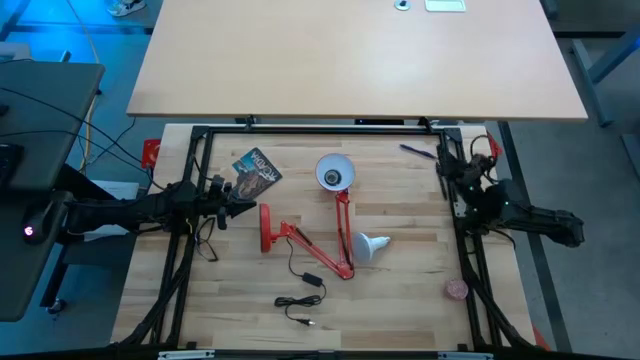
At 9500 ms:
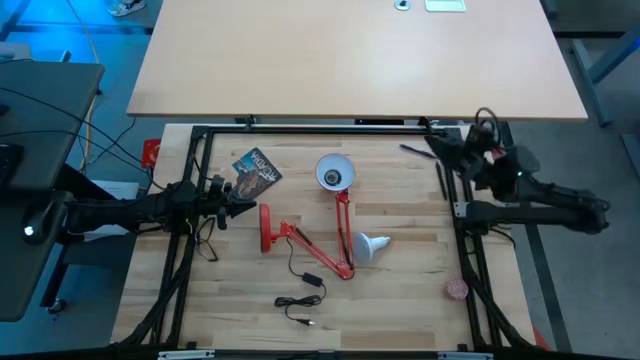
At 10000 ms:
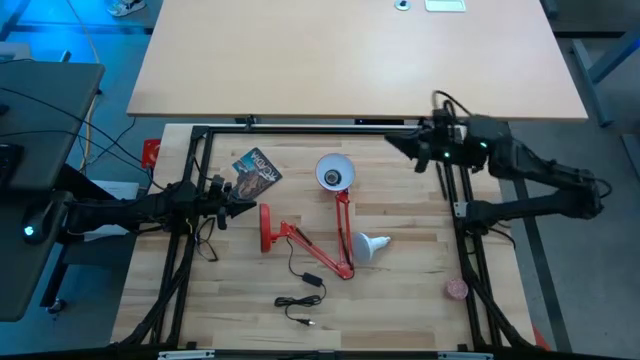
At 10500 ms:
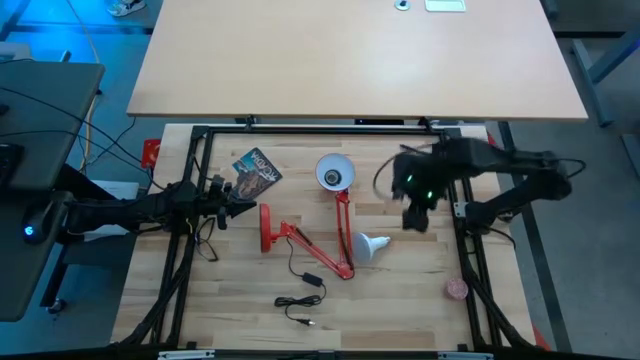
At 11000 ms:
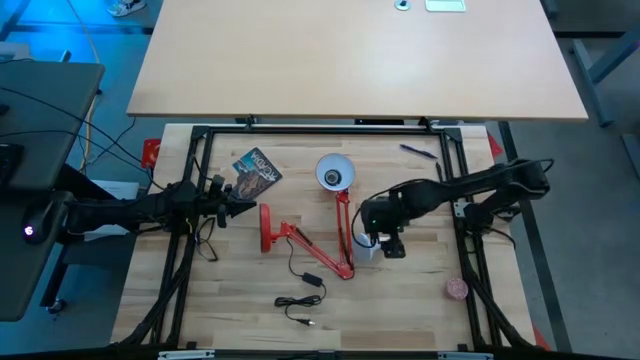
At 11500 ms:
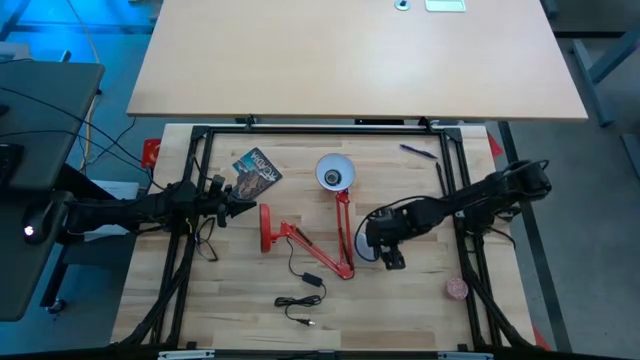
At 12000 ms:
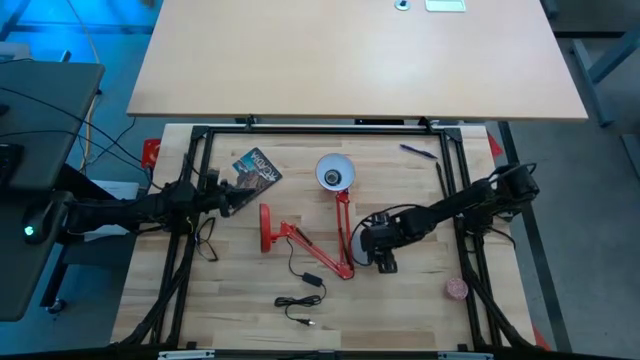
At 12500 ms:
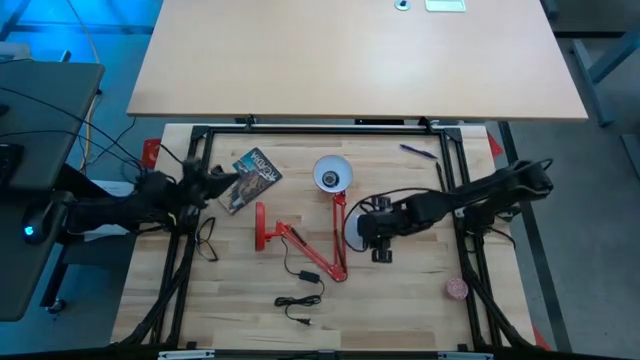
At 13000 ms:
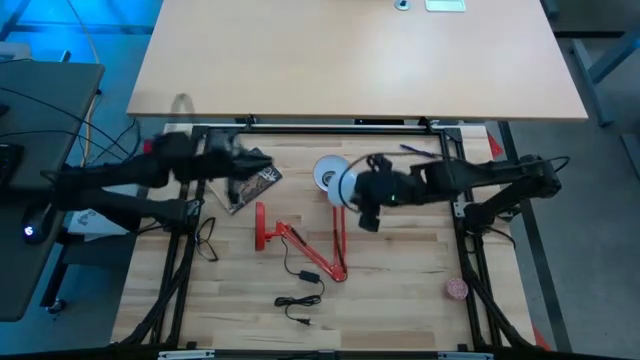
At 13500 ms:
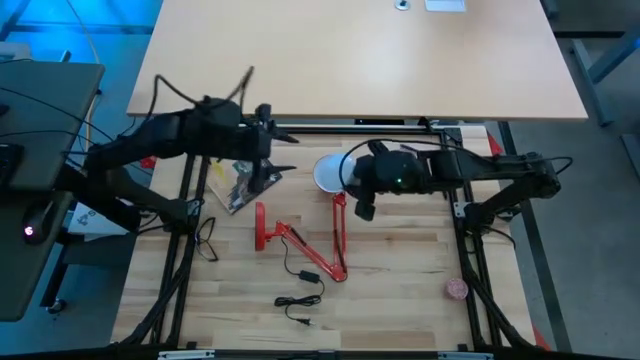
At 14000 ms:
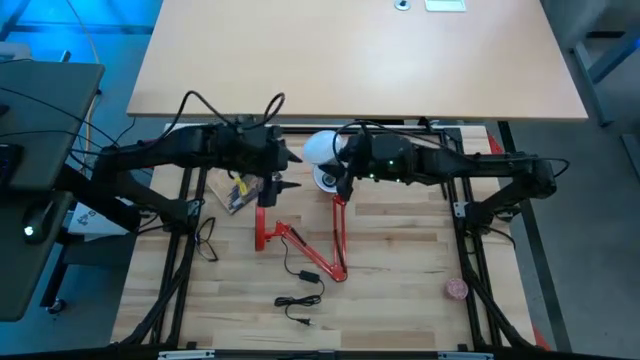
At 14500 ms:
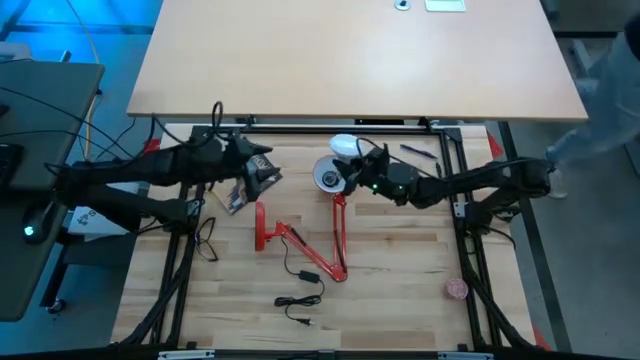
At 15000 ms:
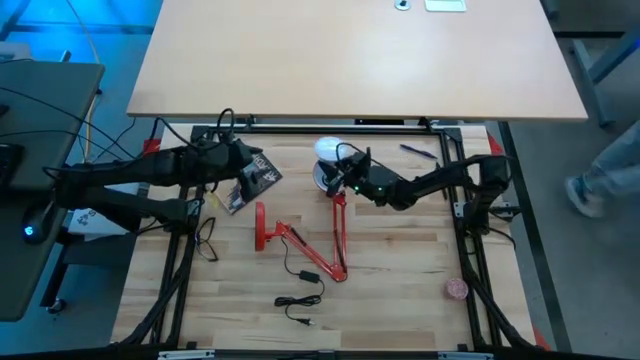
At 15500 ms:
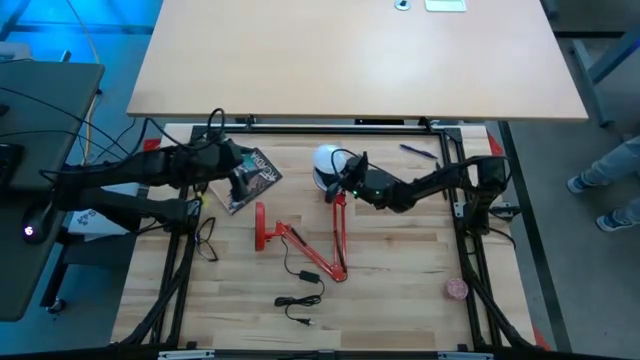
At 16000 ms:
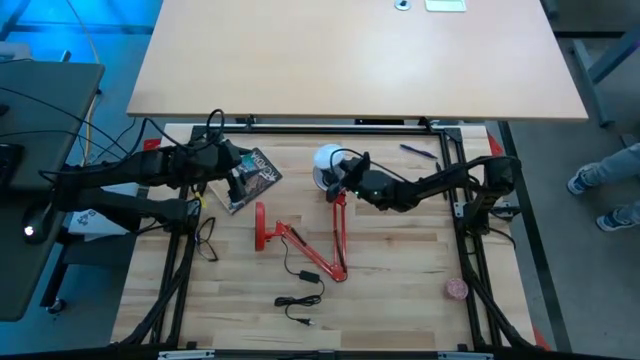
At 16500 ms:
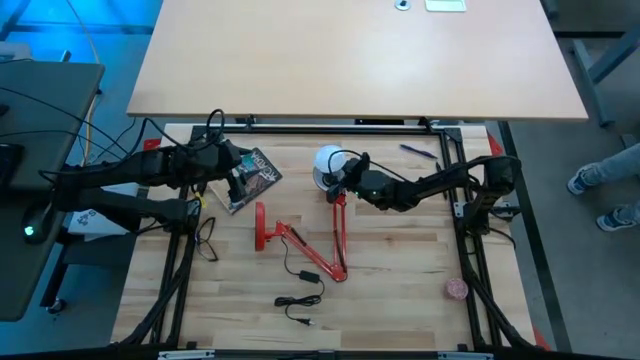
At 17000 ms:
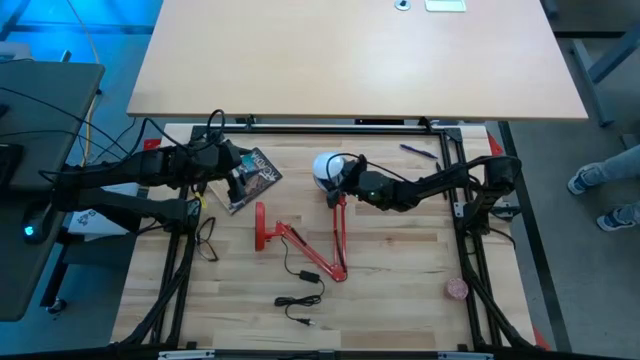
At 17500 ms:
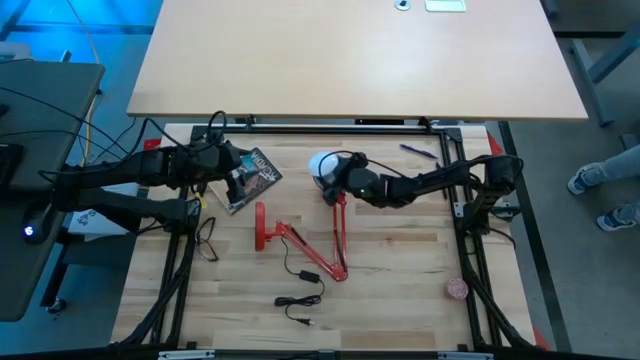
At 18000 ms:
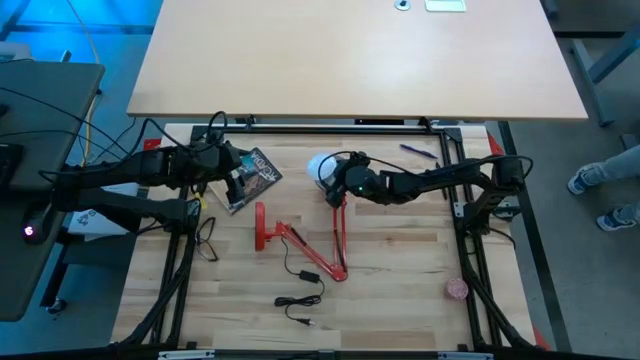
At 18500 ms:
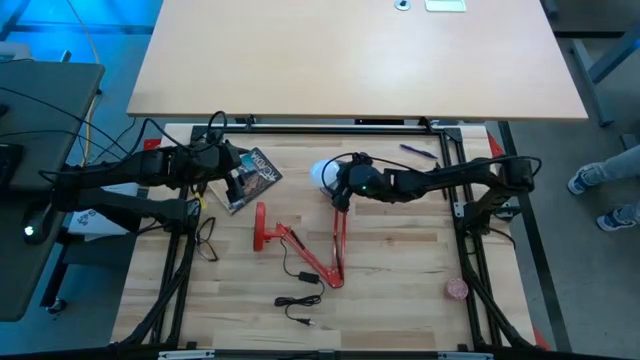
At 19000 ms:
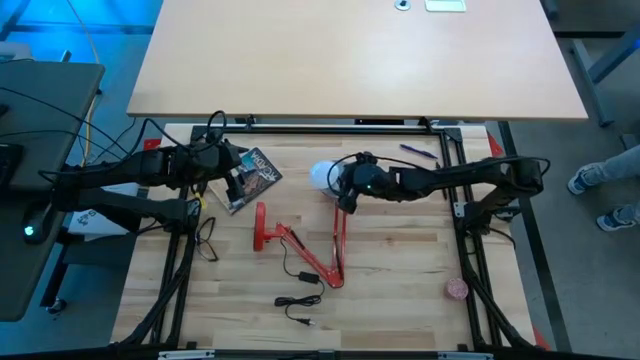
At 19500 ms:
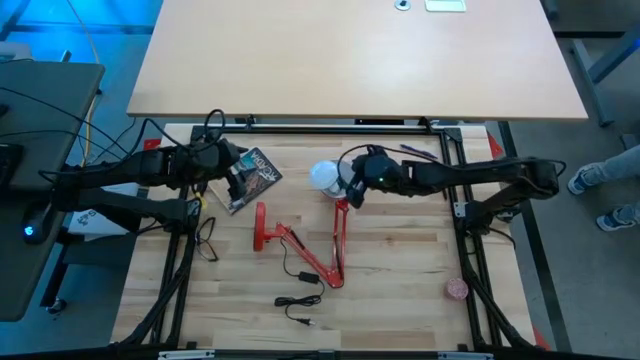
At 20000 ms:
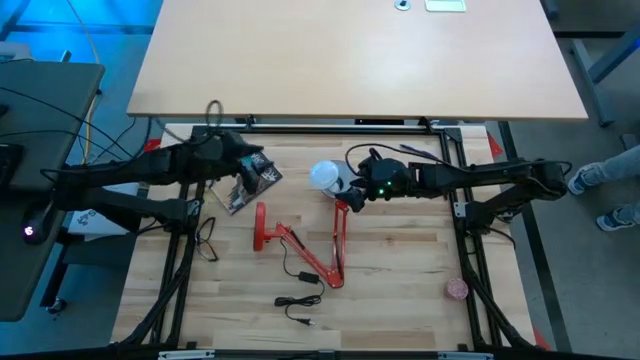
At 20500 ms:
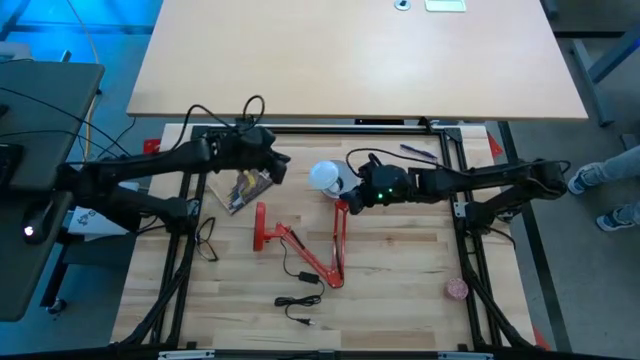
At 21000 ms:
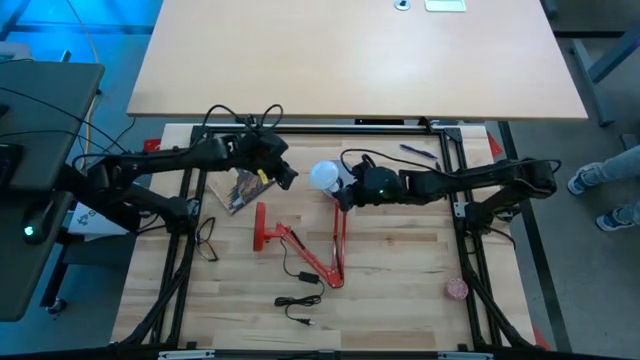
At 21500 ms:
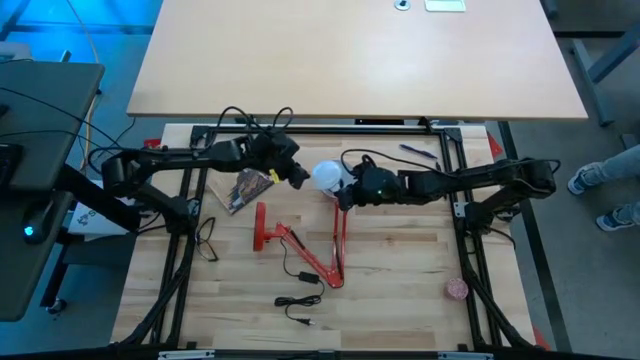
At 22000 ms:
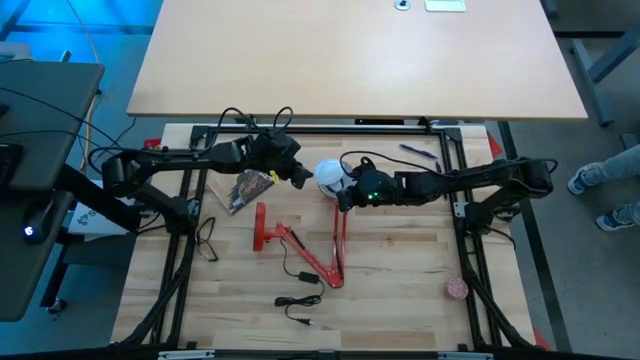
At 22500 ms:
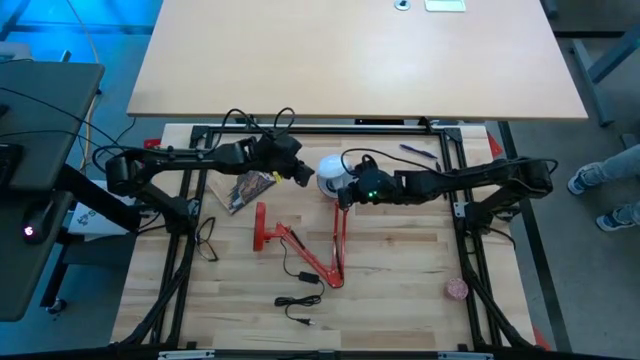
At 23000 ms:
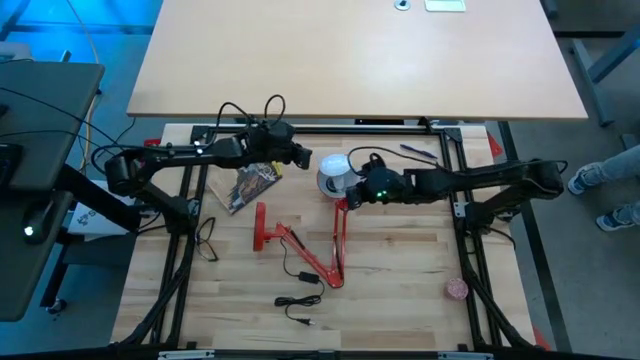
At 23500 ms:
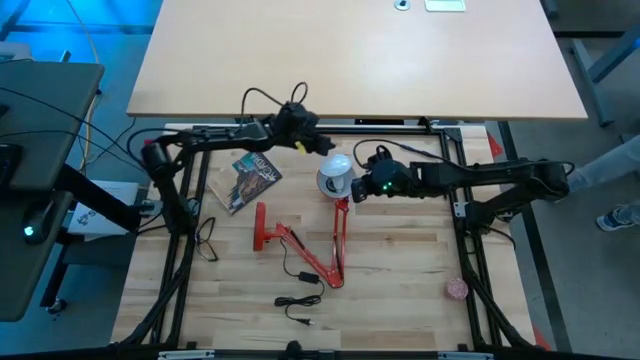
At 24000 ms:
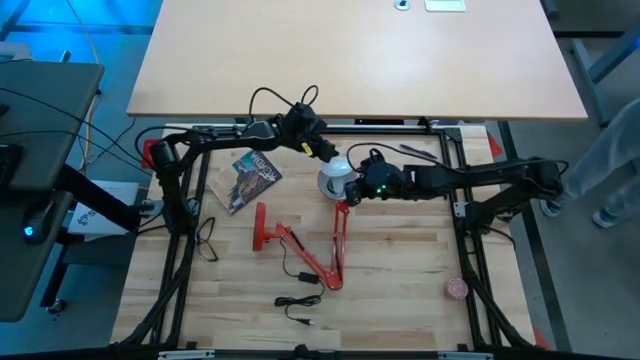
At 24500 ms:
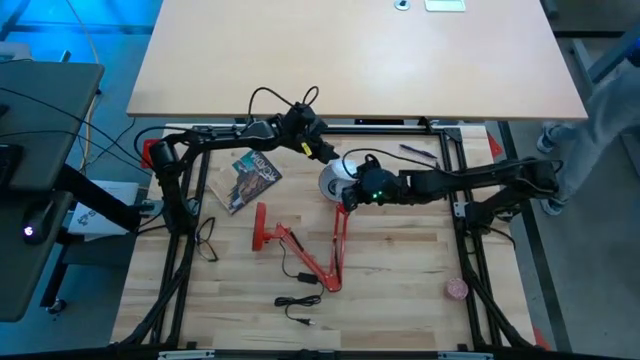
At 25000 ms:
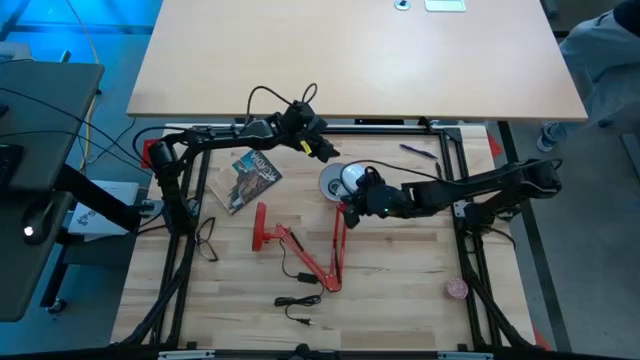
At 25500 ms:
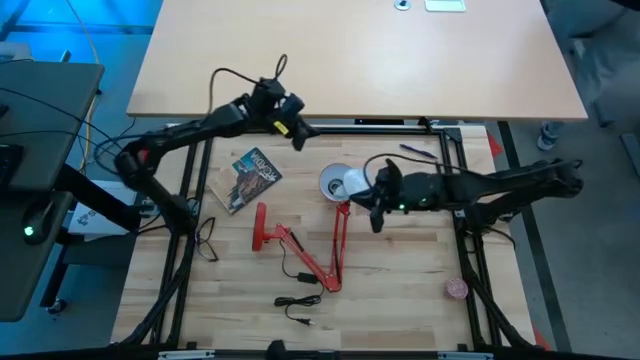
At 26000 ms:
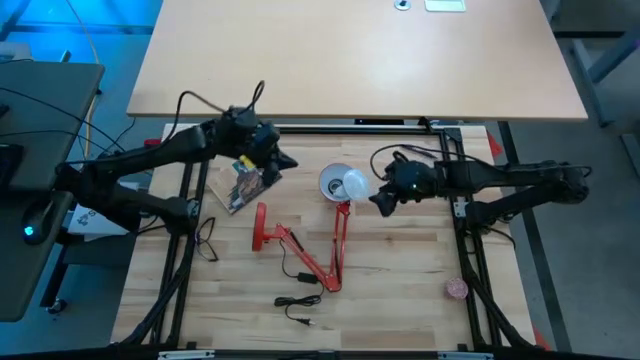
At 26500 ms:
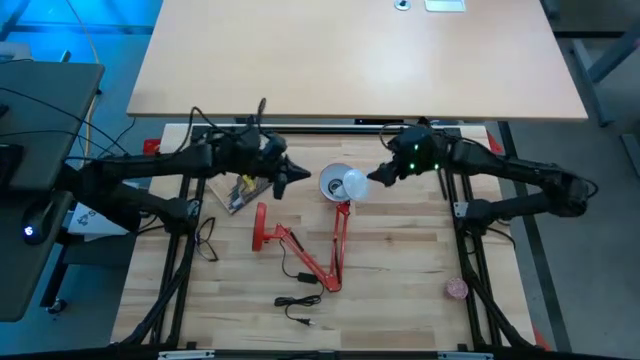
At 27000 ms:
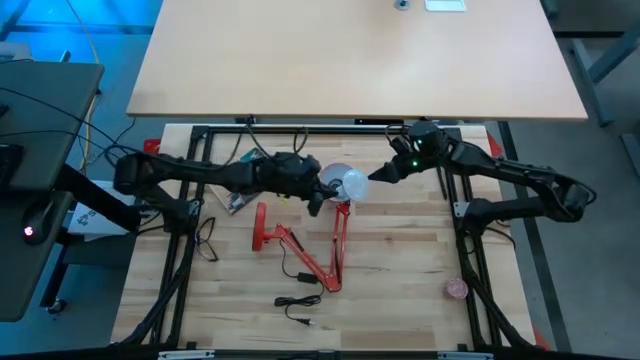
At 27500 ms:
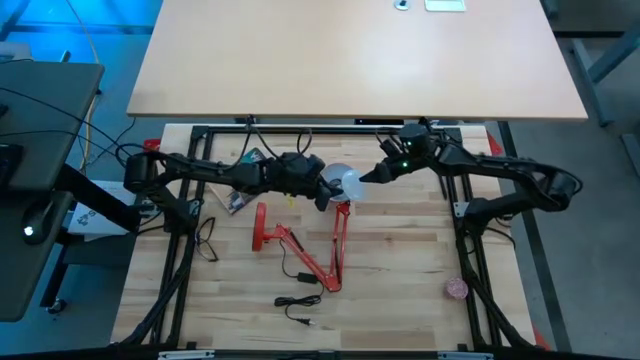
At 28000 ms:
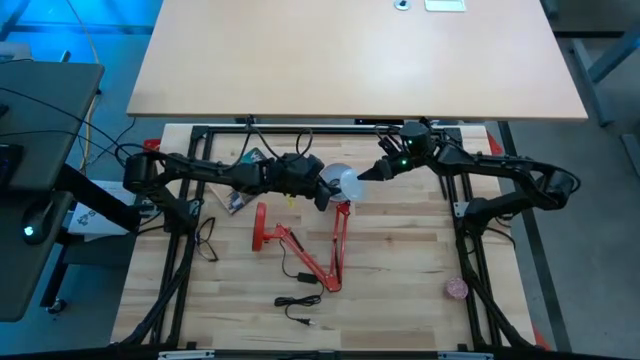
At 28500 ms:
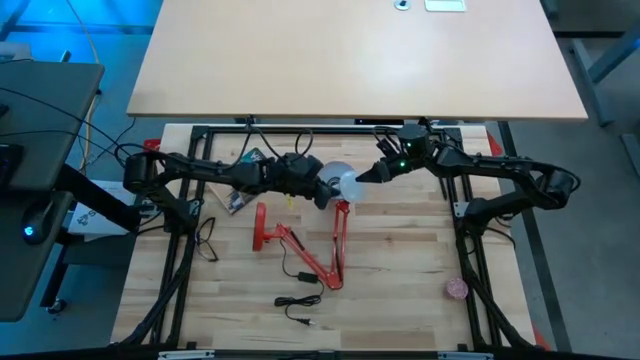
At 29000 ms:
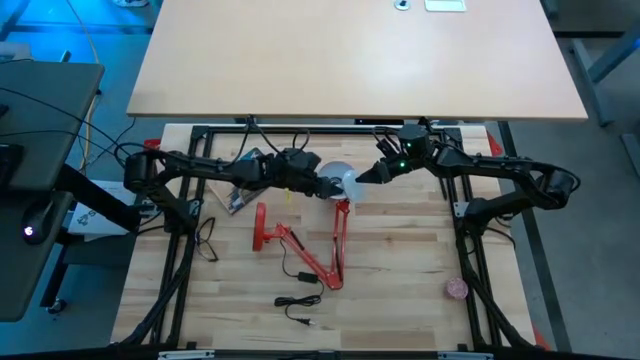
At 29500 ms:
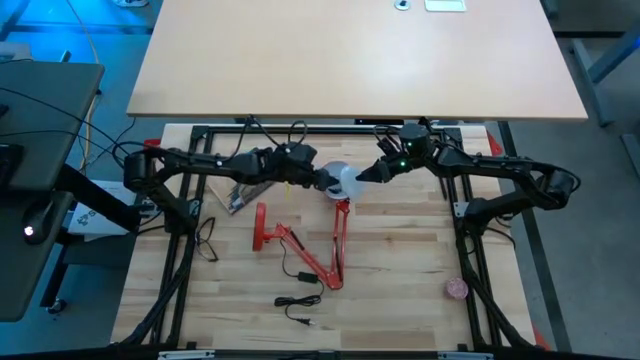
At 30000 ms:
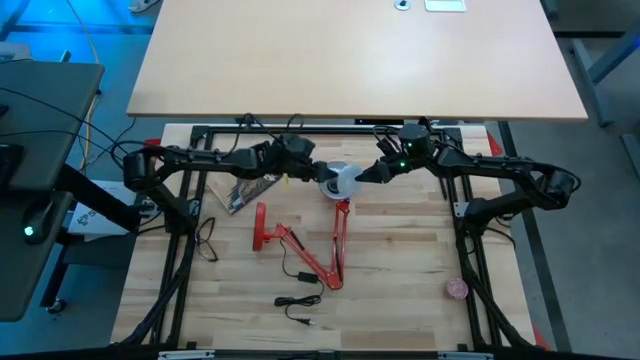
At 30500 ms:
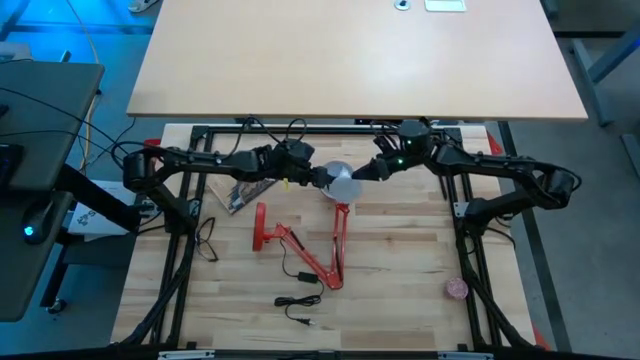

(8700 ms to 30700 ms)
Task: Screw lightbulb
Insert the lightbulb into the red lamp
